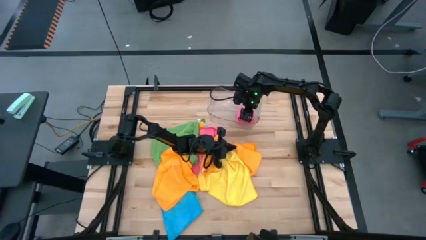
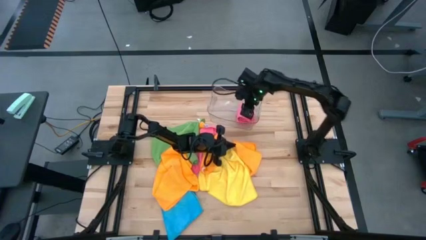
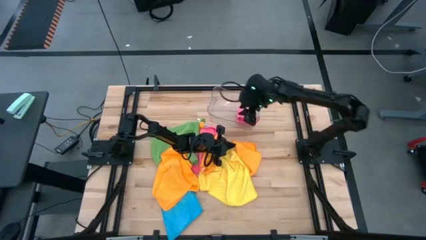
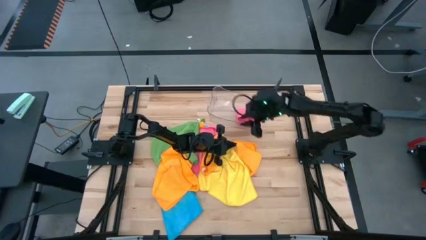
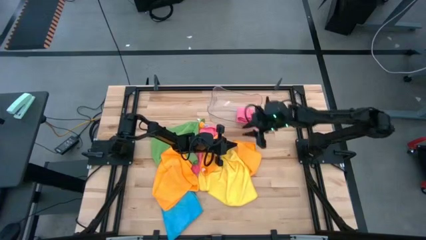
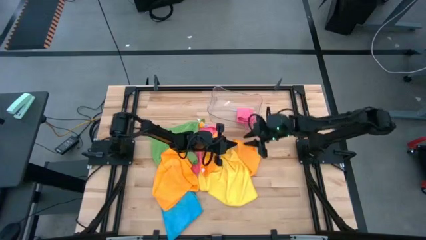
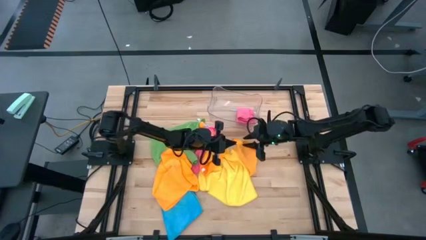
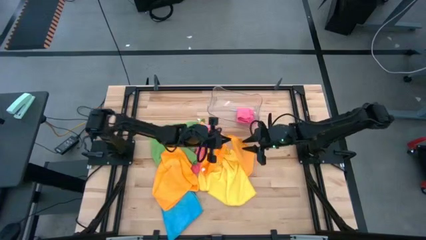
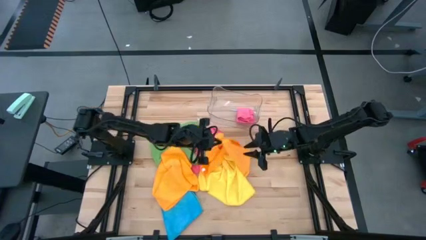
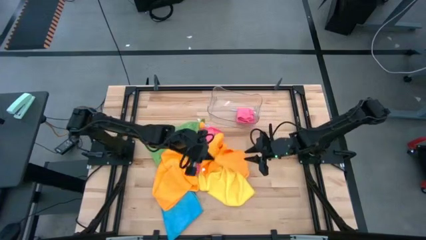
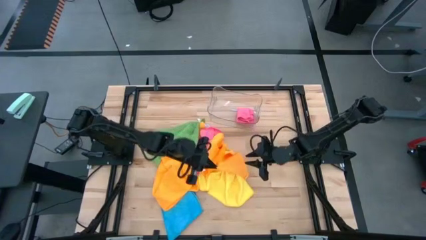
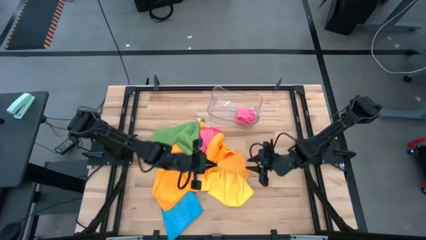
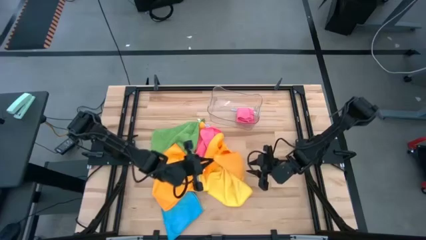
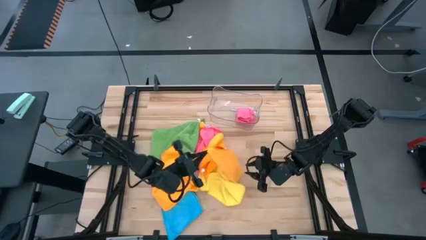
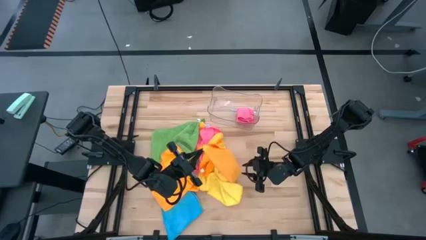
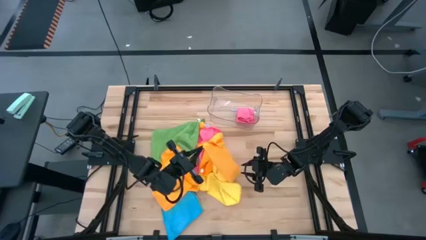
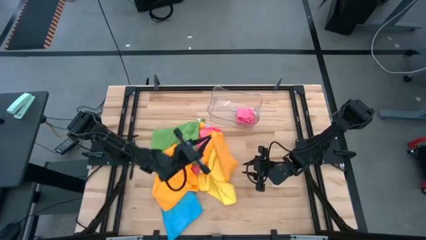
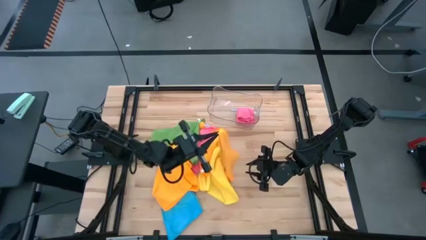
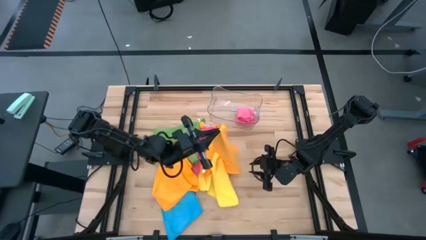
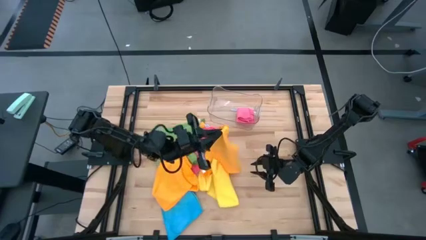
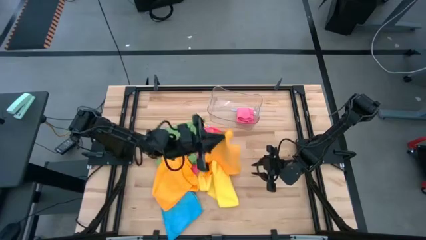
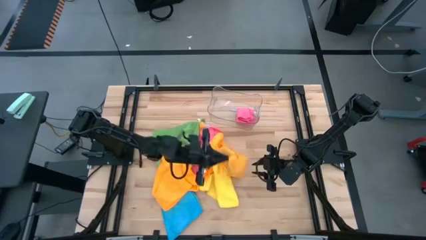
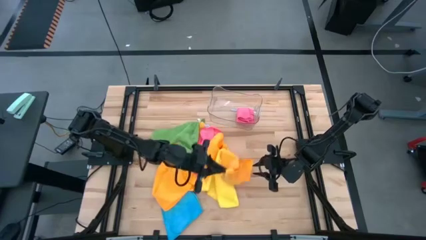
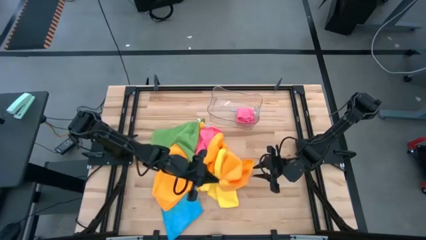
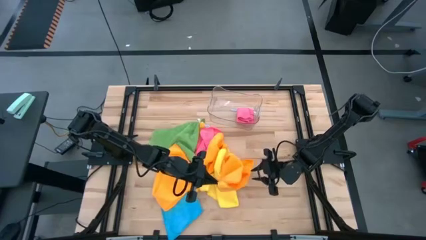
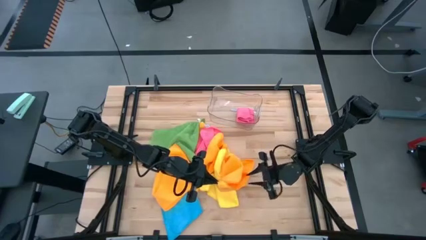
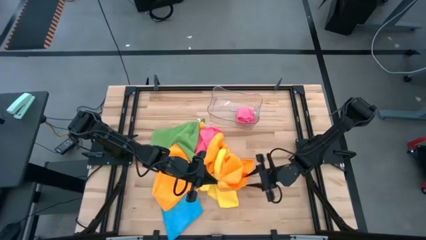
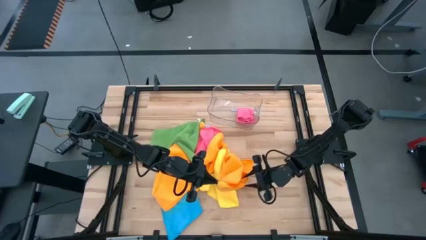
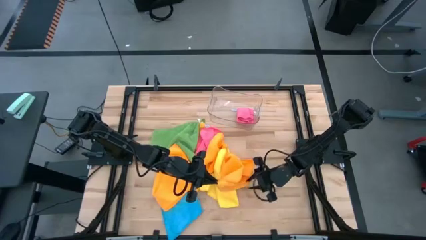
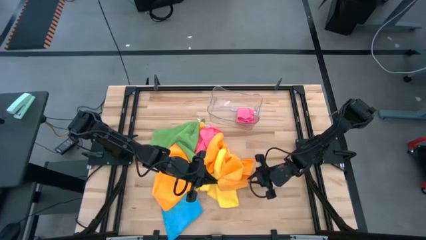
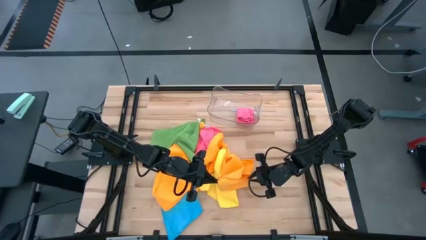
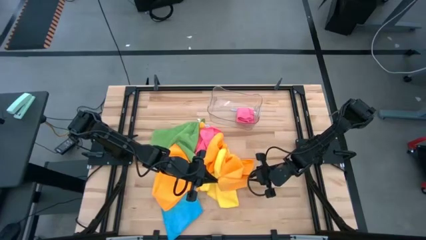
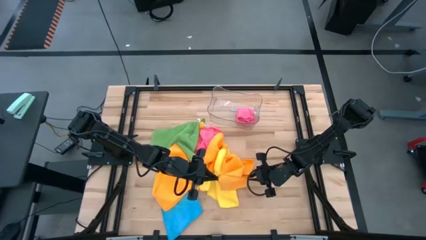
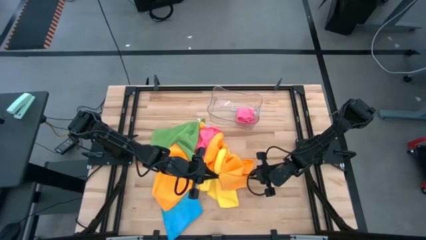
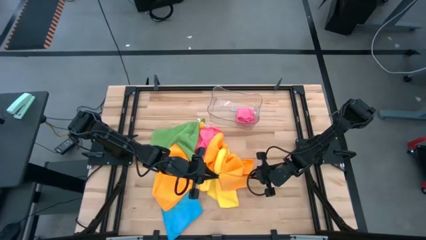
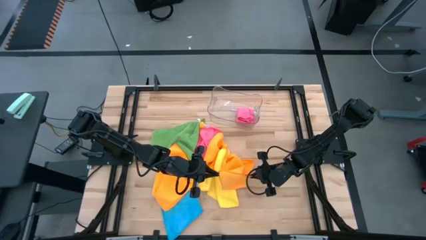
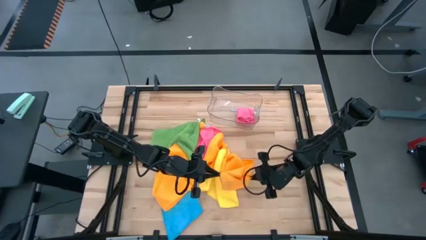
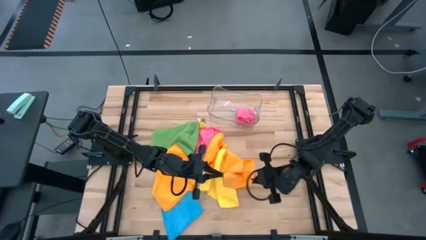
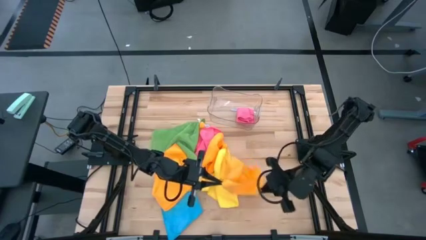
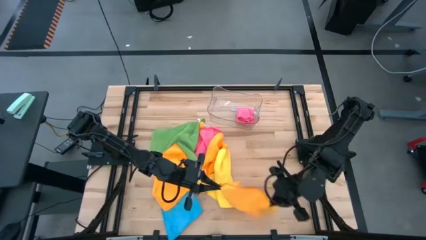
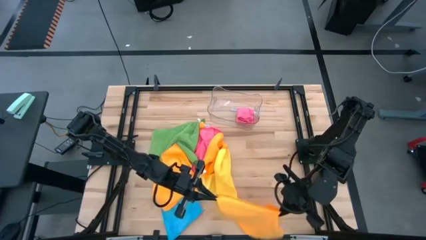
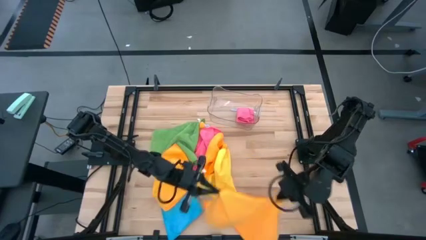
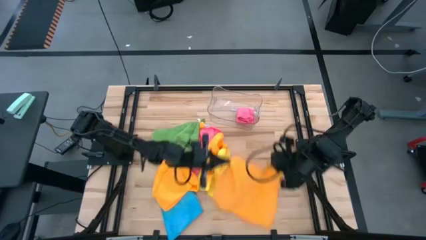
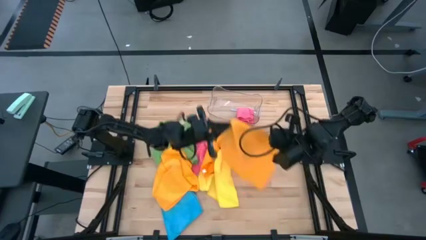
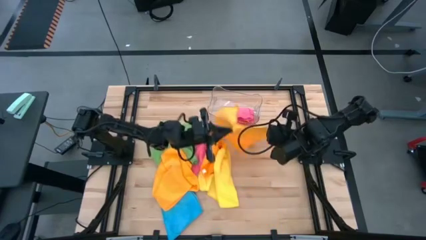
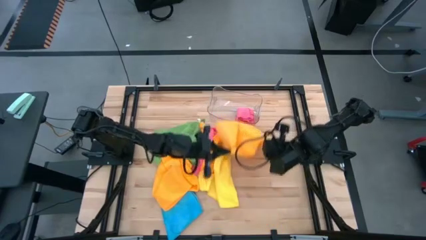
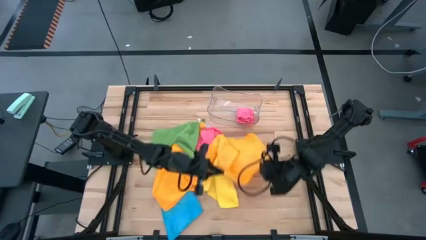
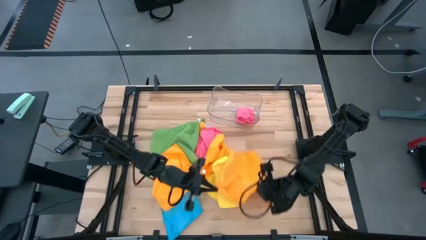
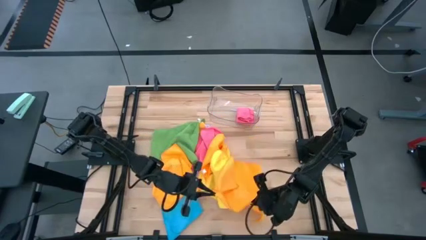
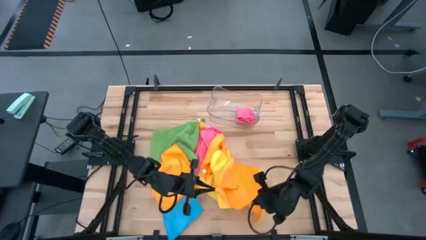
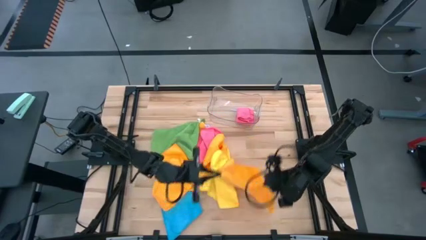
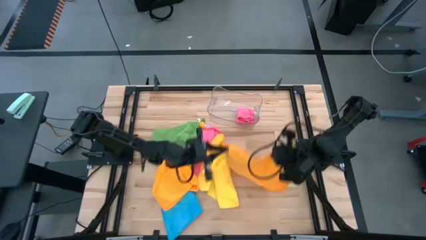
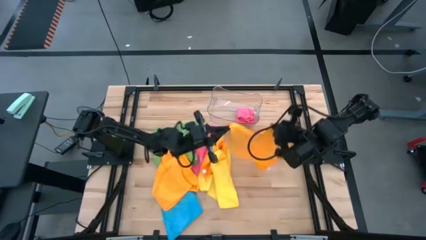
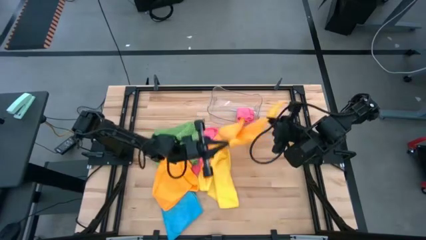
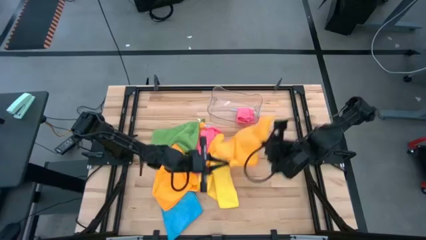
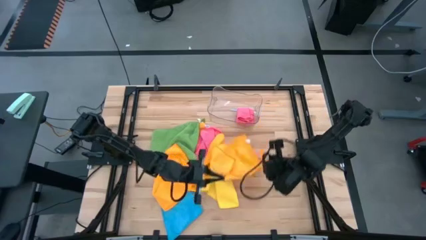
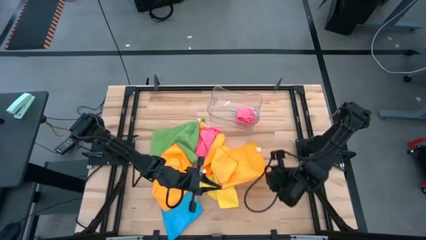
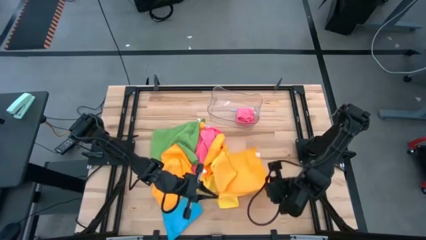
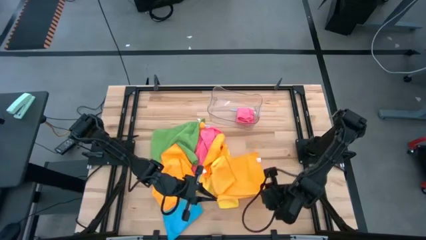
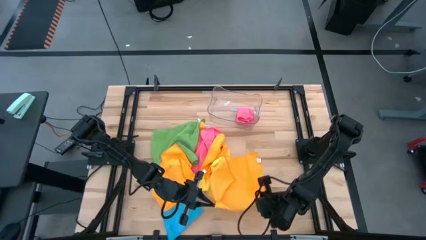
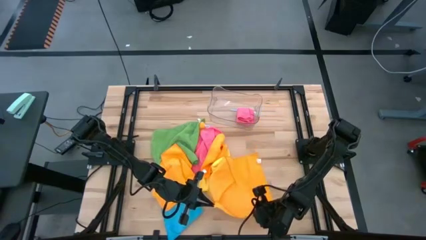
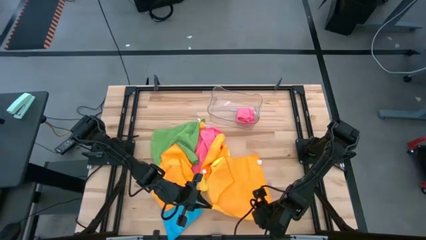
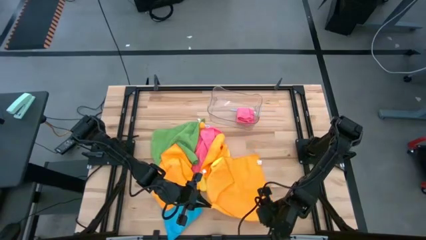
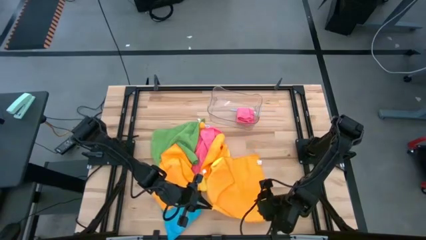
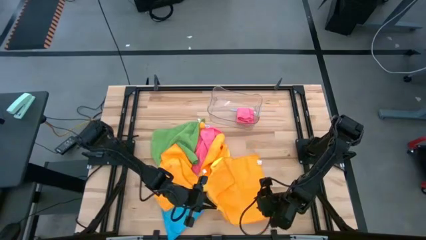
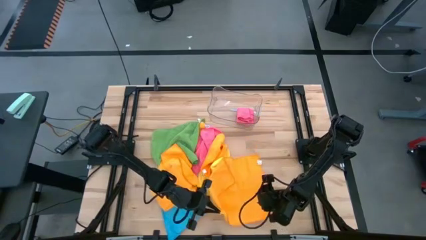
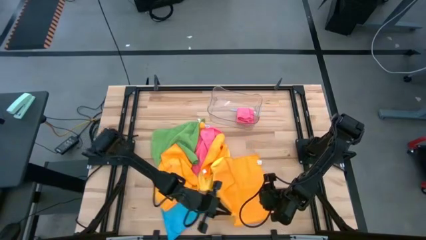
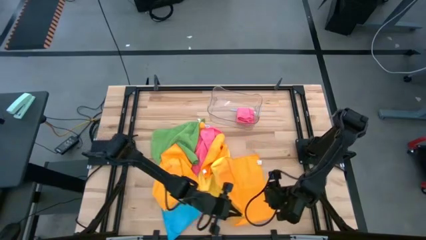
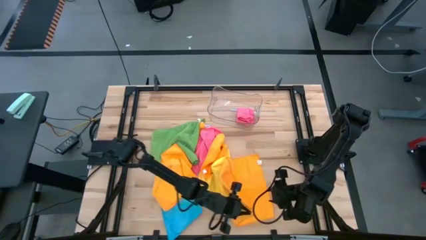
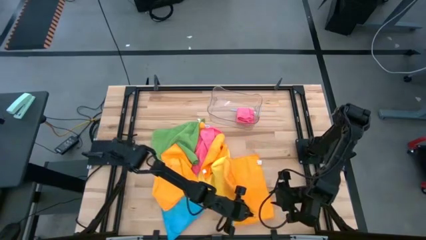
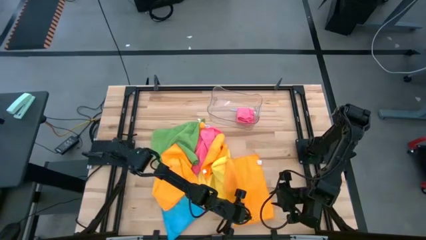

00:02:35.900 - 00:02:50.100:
Task: Fold microfiber towels
Fold the right orange microfiber cloth

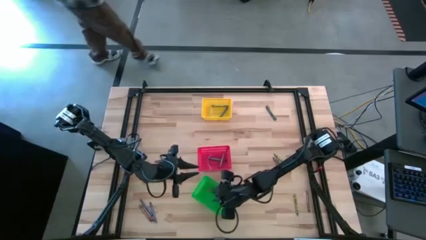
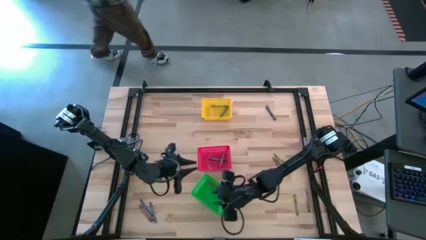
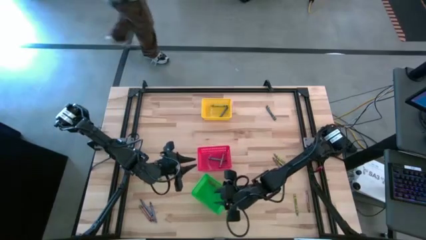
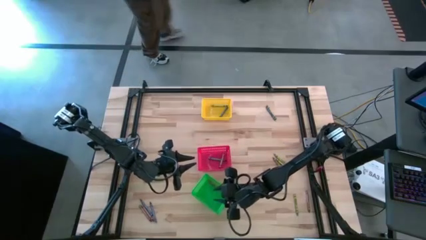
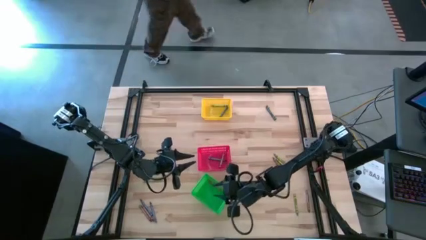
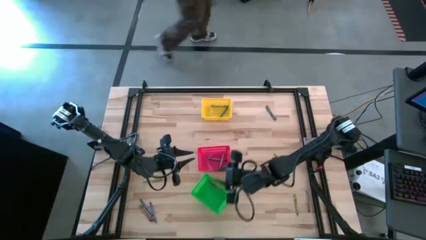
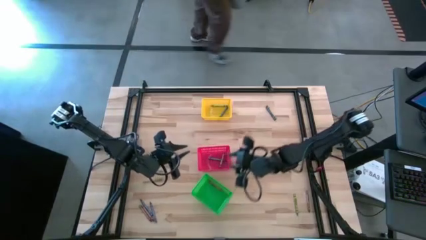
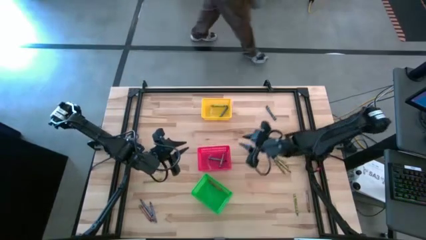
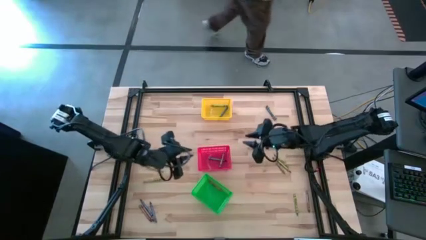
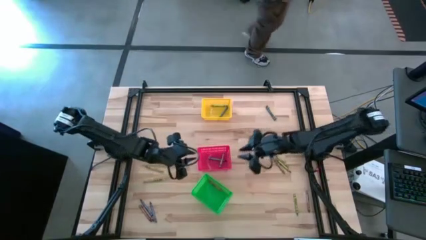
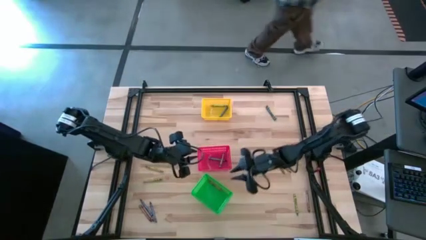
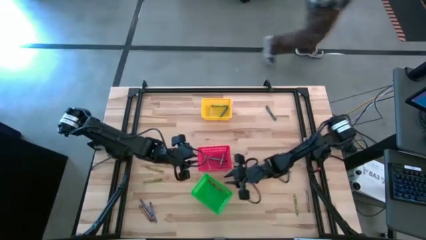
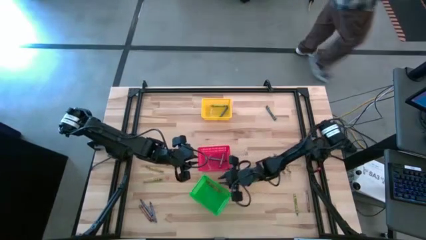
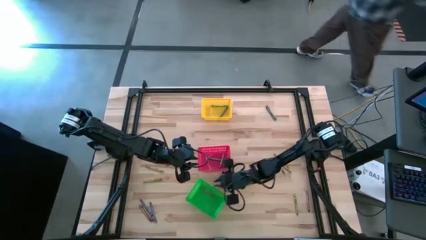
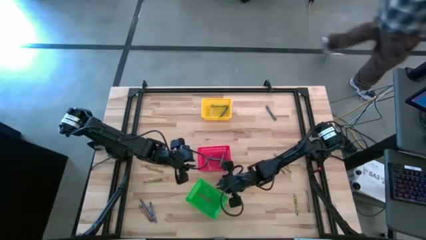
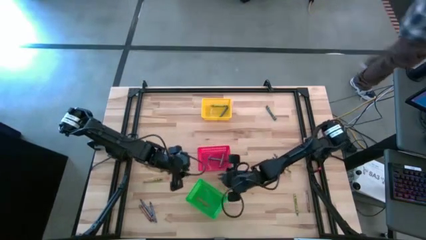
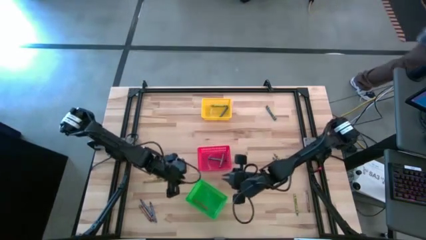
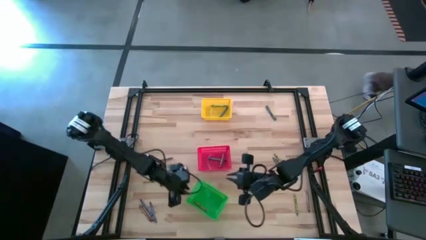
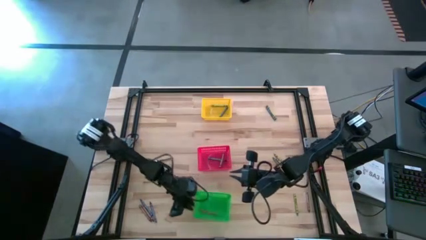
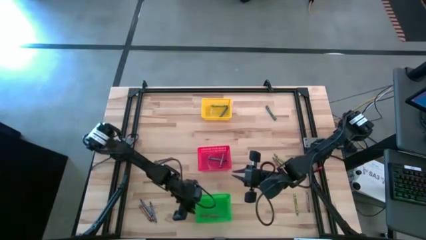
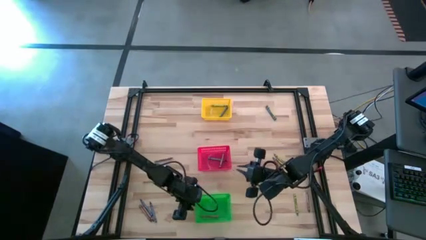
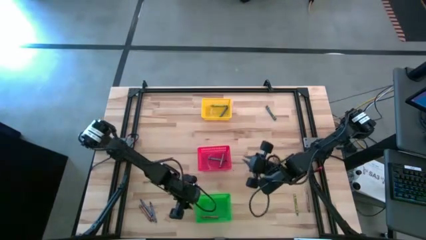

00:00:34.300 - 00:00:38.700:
Task: Sort crayons
Adjust the green bin
